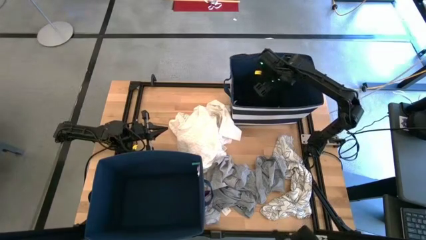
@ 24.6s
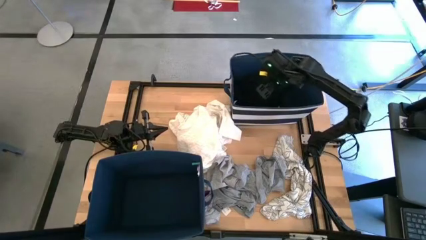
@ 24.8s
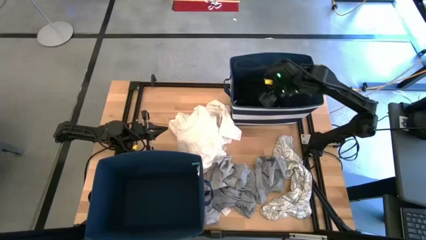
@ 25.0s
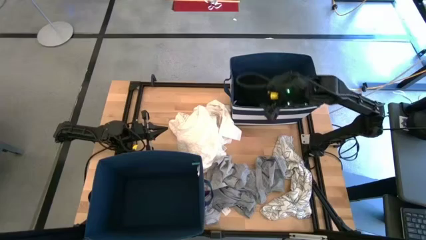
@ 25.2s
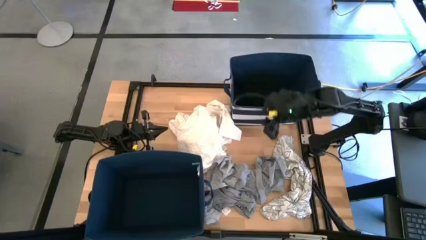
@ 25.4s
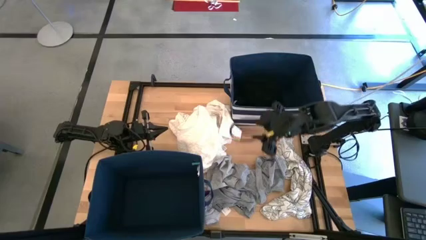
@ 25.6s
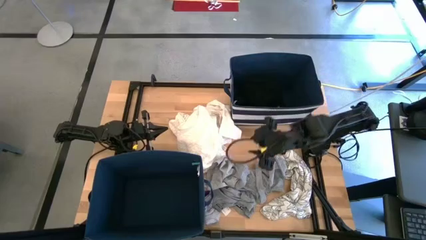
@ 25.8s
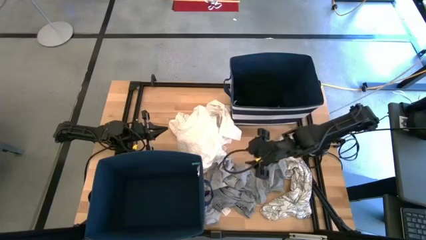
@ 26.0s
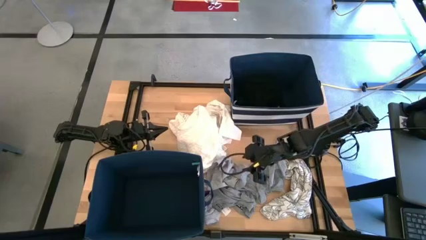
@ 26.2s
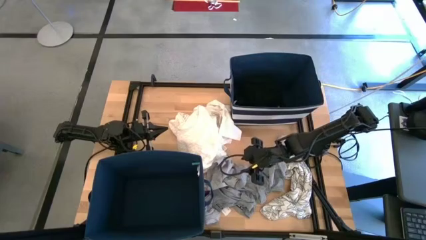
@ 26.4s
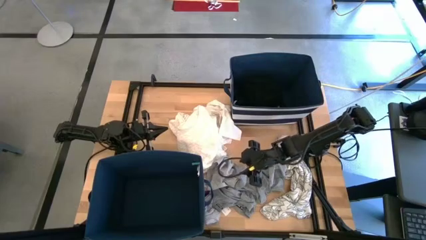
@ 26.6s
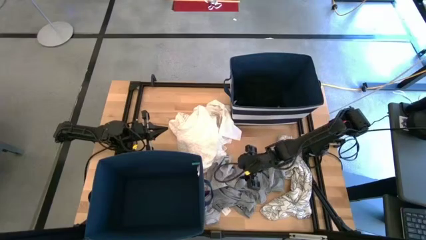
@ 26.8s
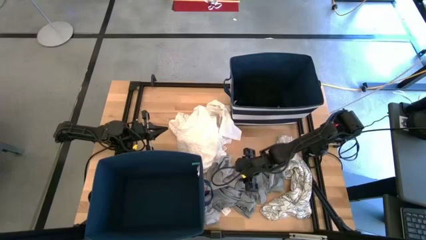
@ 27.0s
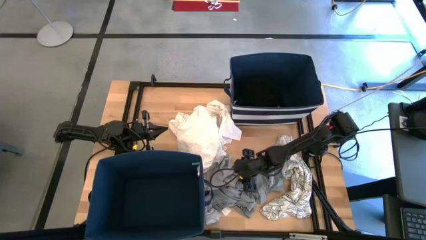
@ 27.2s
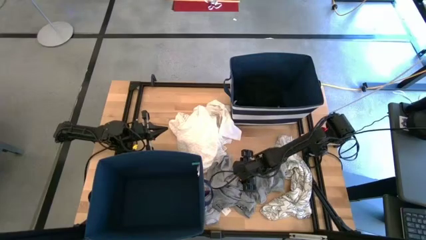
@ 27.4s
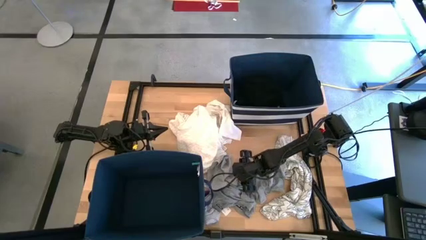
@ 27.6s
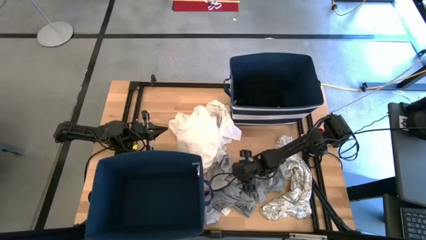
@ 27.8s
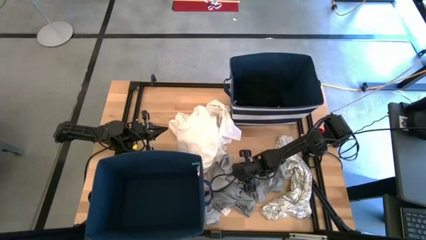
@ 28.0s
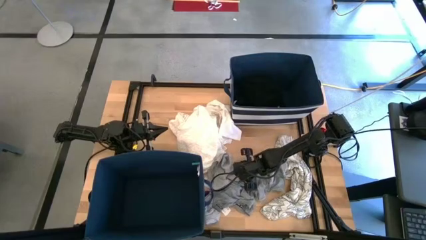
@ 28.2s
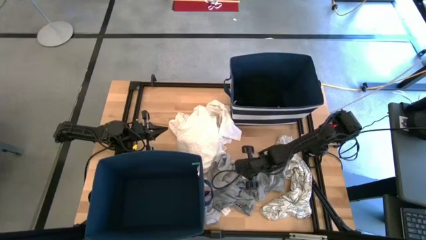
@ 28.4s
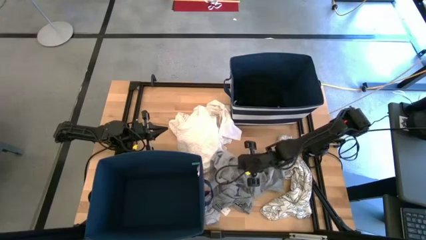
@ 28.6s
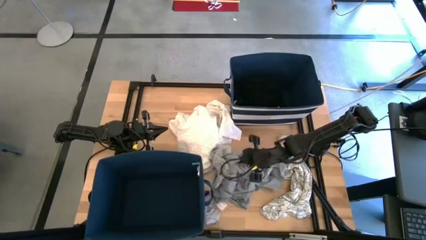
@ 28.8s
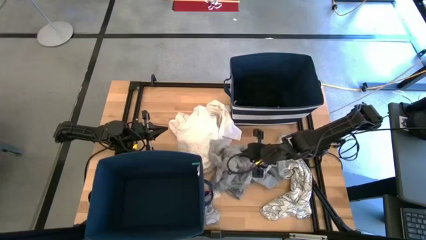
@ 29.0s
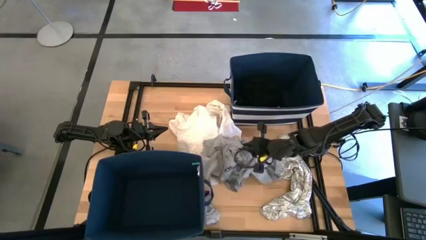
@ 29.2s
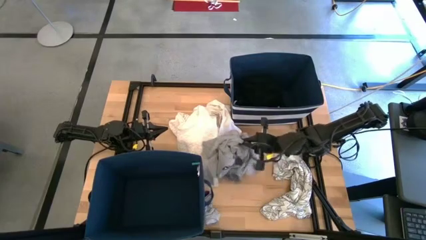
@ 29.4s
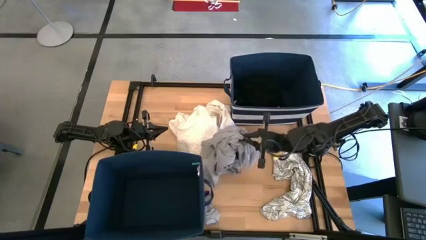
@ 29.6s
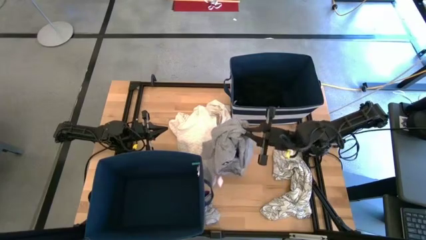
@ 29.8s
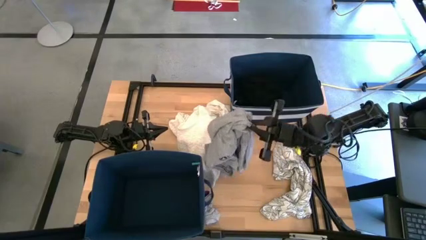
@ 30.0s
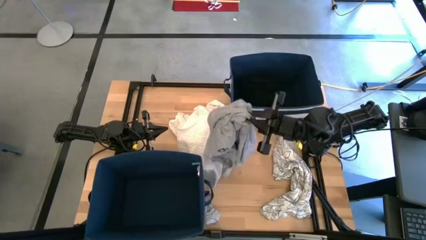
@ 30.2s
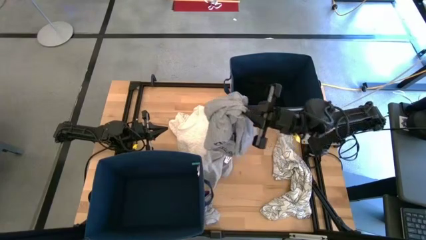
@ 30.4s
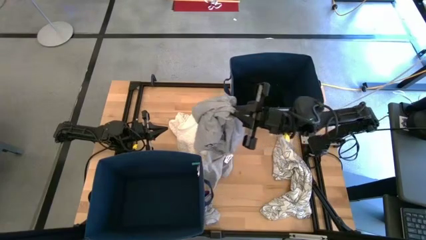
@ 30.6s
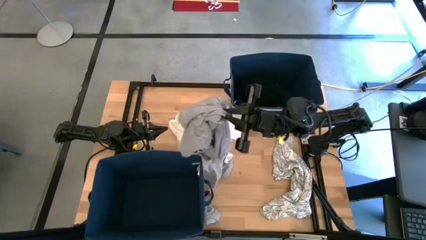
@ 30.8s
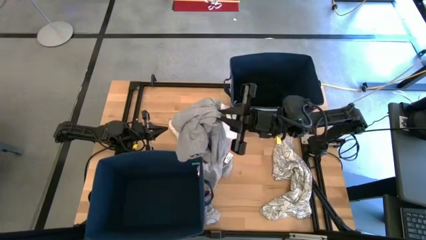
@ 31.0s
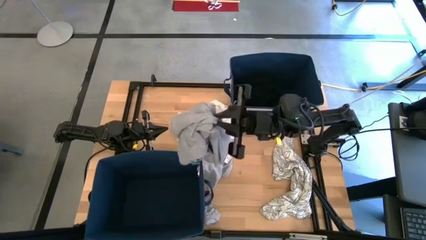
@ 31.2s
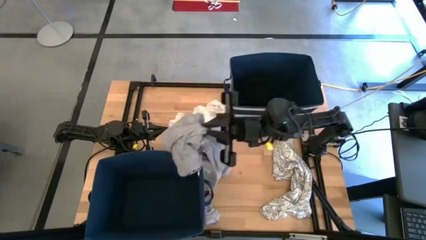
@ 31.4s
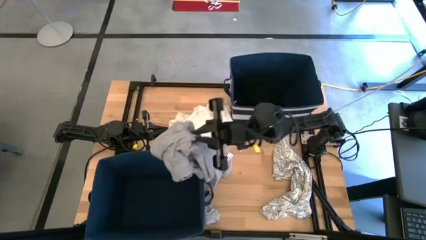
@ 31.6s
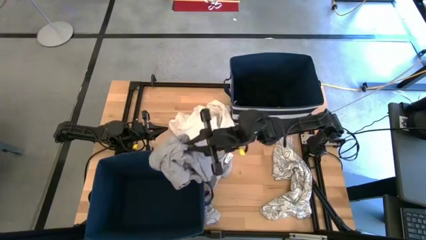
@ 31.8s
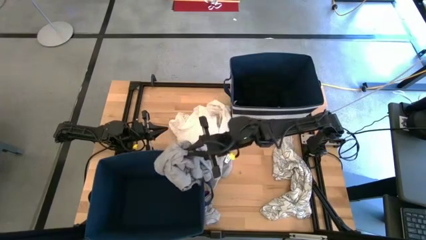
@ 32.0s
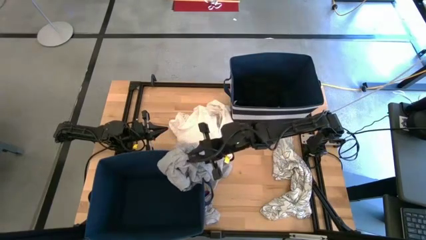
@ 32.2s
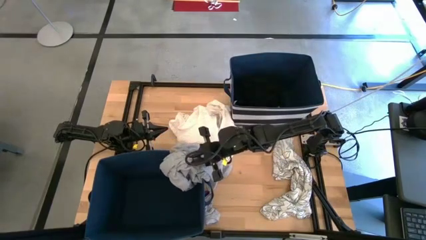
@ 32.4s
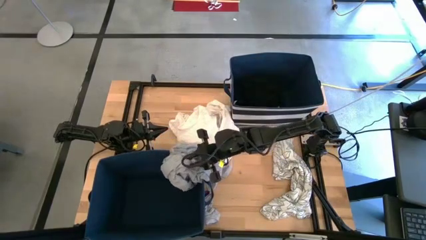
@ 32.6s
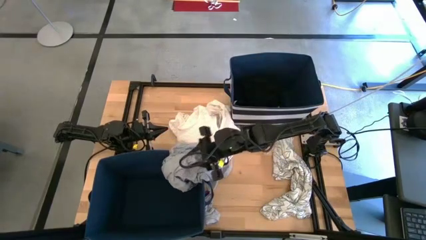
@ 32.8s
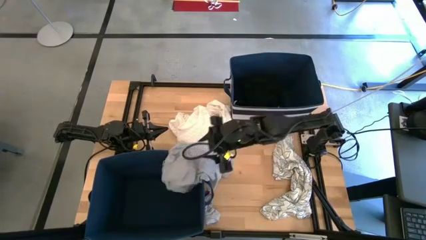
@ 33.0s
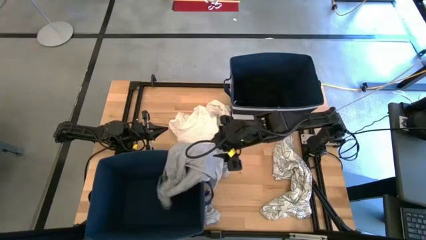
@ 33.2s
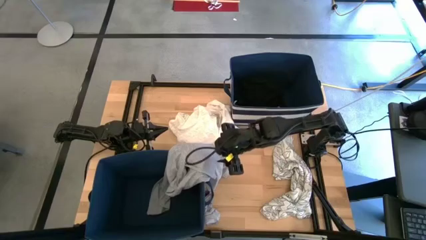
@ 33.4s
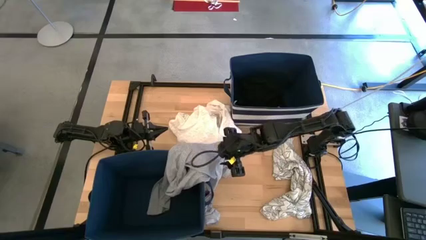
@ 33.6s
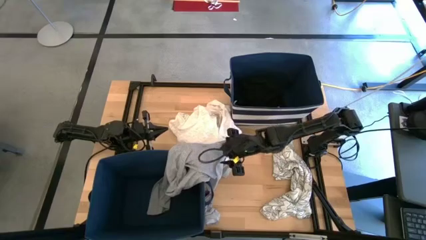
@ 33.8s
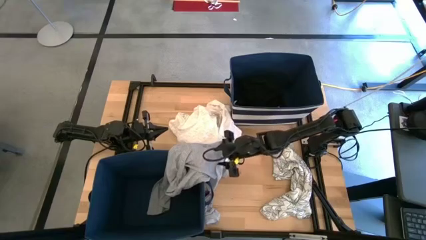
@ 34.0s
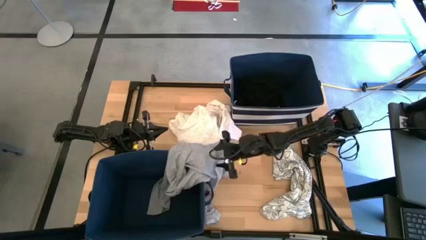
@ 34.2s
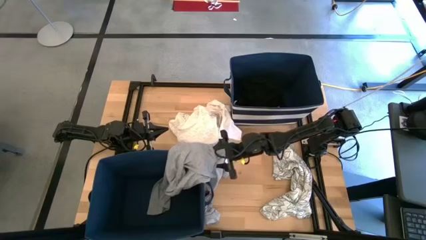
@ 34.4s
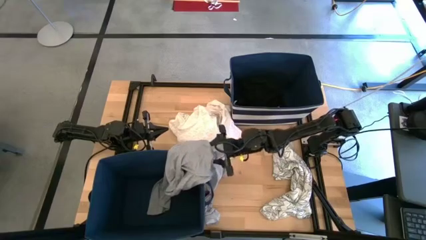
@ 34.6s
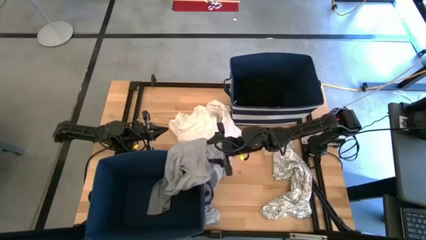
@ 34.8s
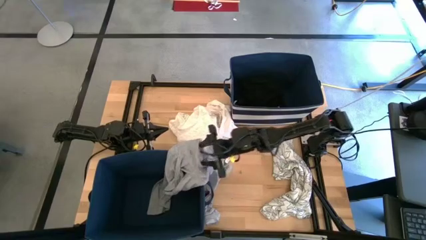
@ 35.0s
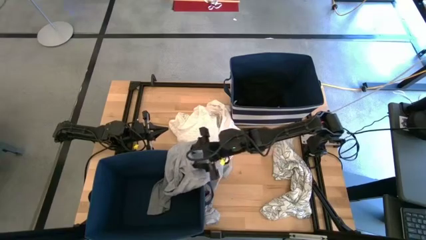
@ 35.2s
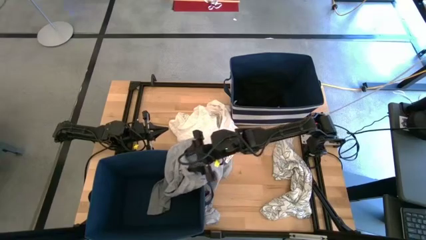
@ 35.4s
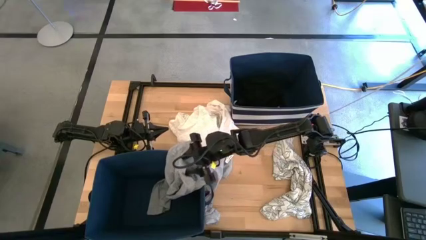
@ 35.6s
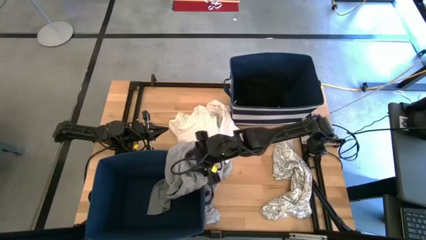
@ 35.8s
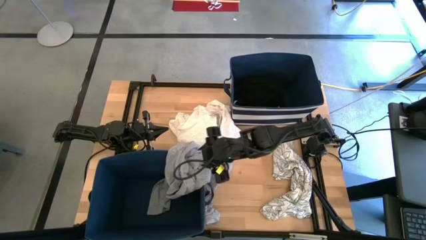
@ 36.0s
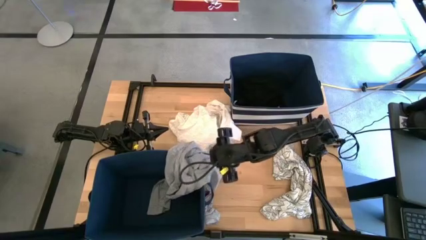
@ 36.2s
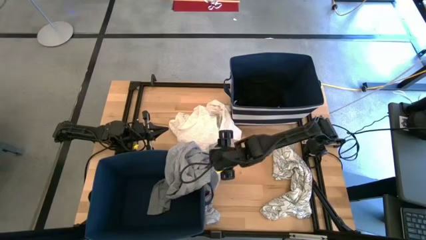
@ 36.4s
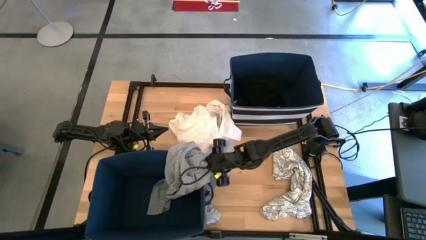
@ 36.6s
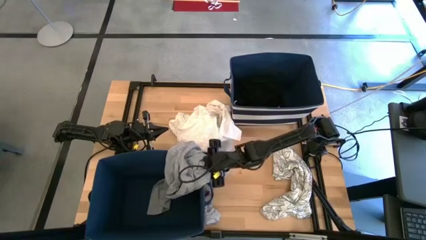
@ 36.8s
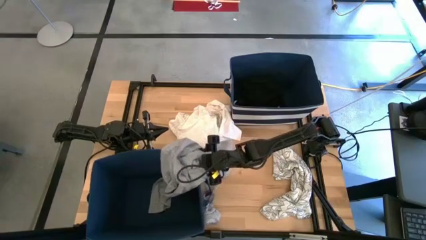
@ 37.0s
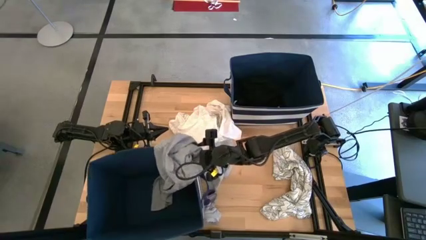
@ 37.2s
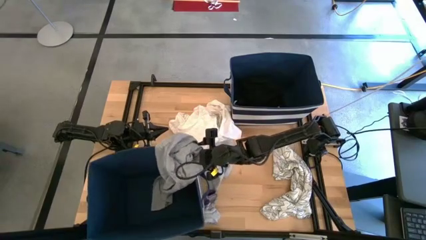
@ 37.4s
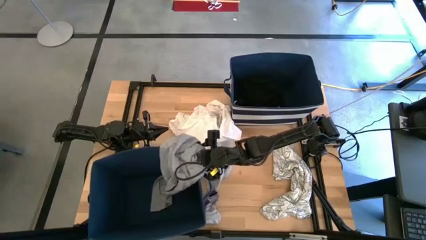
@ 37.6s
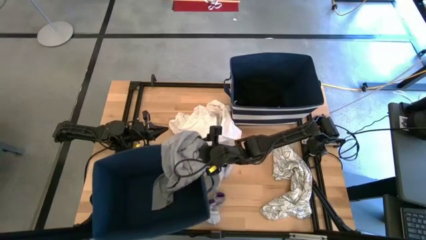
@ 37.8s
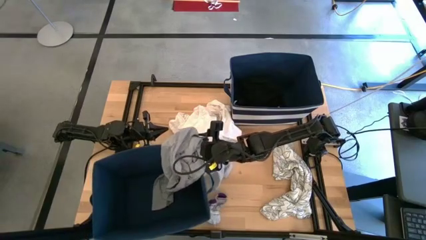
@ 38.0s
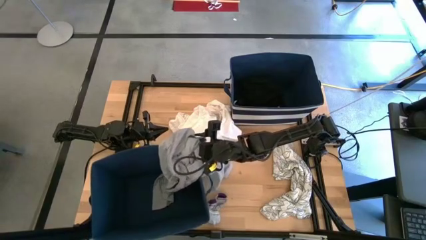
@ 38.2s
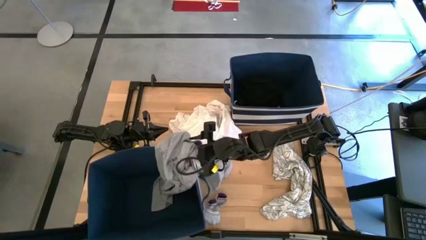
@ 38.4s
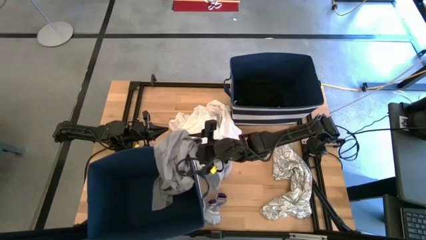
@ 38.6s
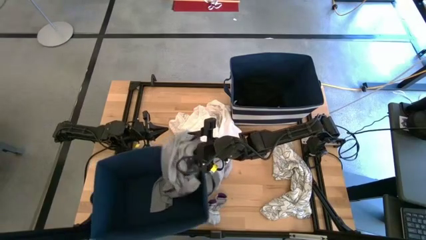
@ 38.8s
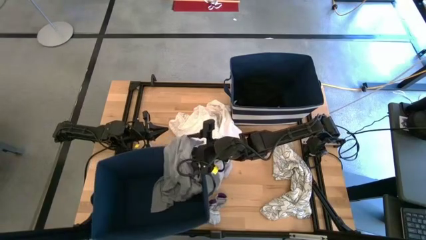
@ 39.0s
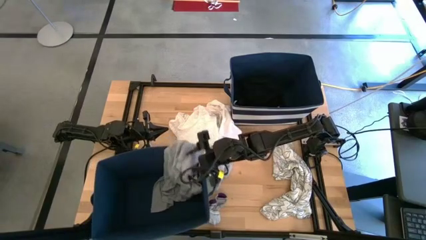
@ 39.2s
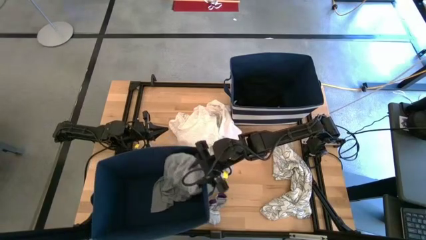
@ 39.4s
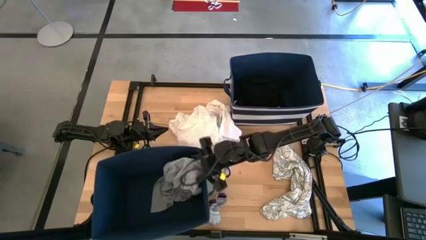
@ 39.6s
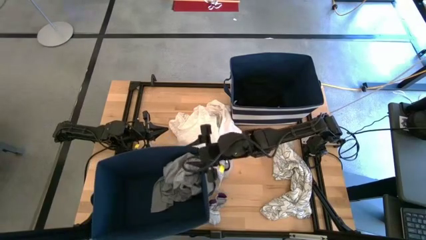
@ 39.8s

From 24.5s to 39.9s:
Task: Sort clothes
Put the gray clothes into the bottom left laundry bin
